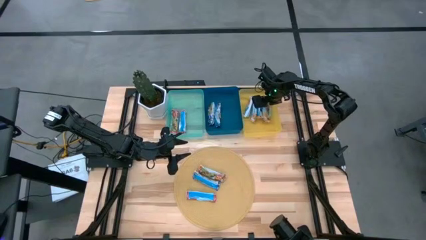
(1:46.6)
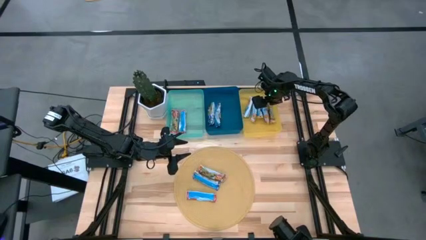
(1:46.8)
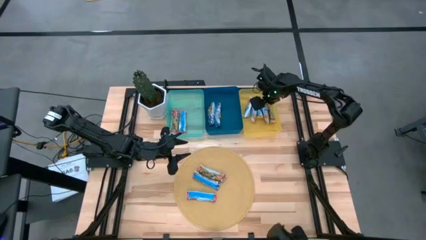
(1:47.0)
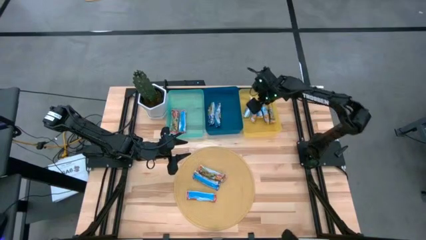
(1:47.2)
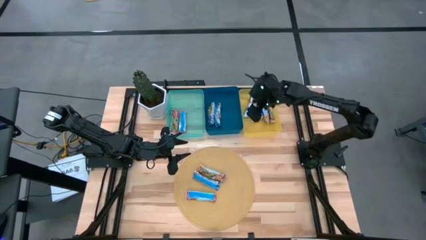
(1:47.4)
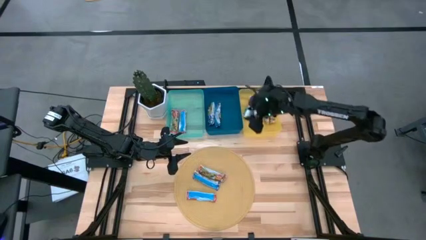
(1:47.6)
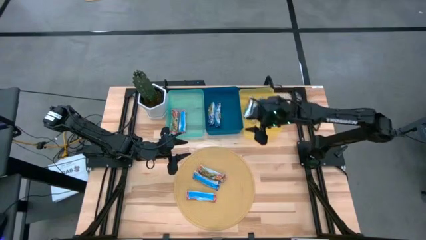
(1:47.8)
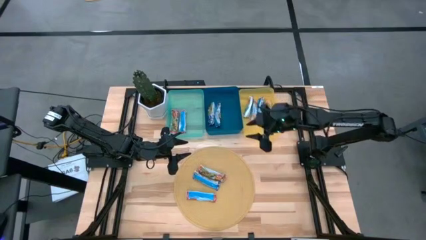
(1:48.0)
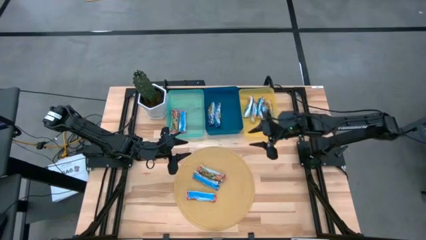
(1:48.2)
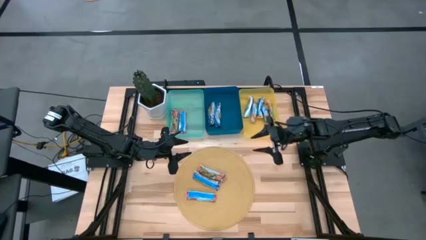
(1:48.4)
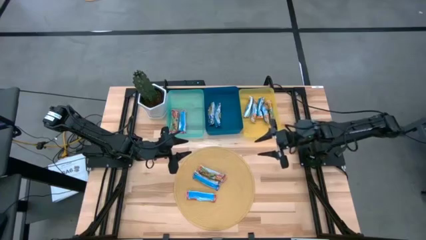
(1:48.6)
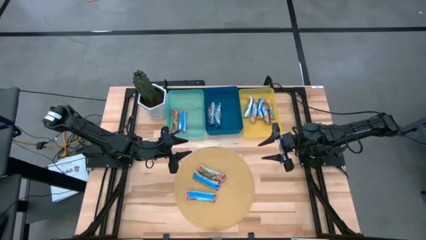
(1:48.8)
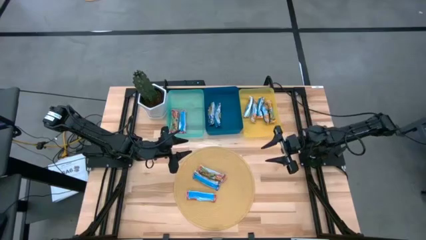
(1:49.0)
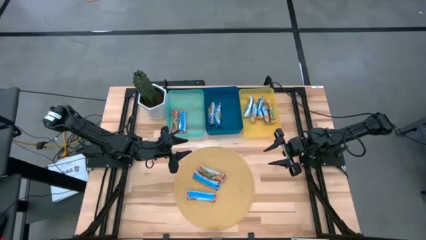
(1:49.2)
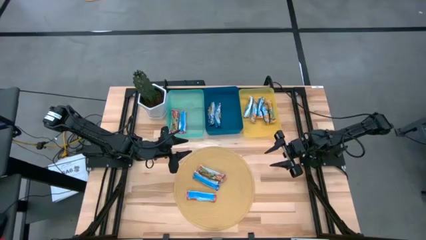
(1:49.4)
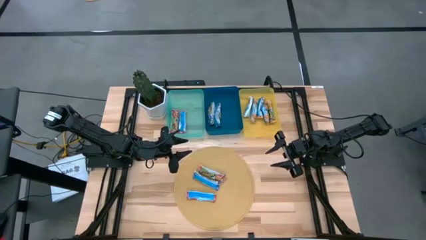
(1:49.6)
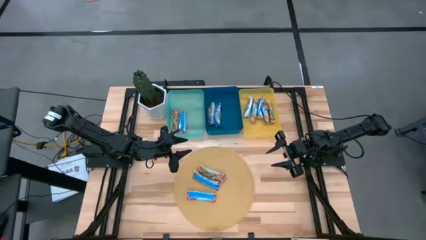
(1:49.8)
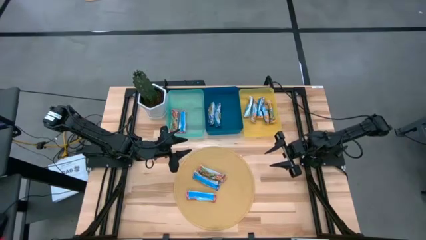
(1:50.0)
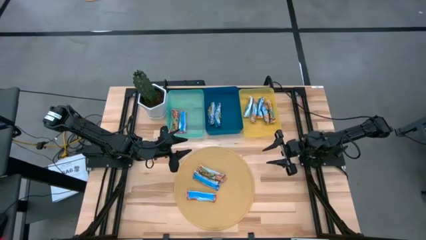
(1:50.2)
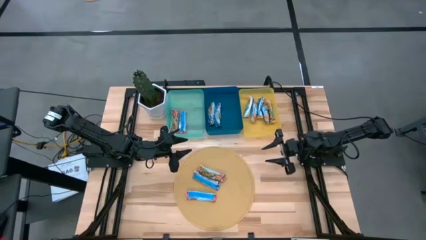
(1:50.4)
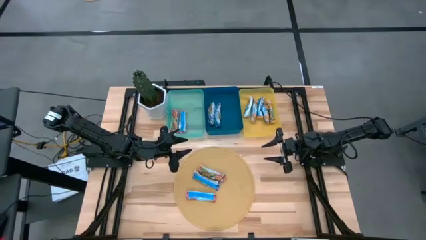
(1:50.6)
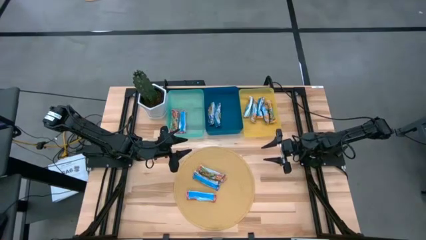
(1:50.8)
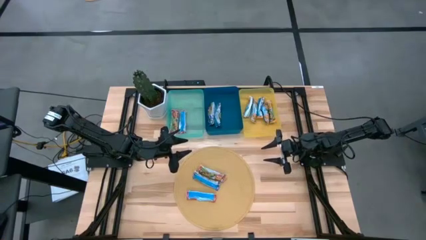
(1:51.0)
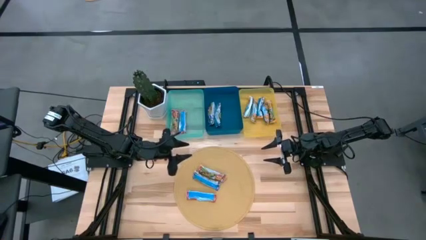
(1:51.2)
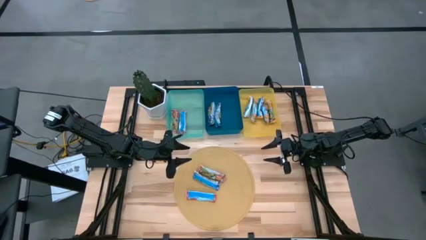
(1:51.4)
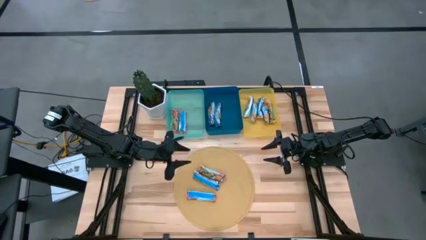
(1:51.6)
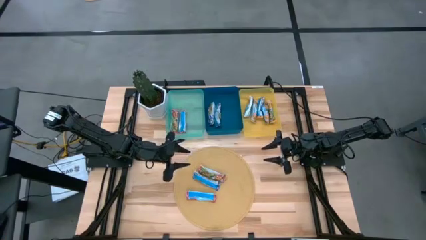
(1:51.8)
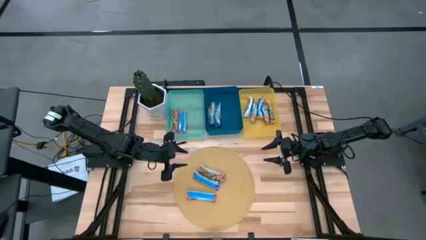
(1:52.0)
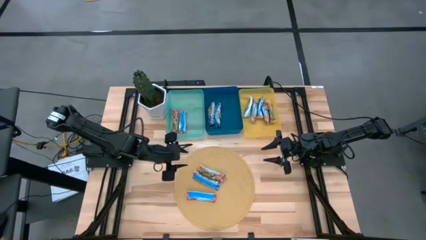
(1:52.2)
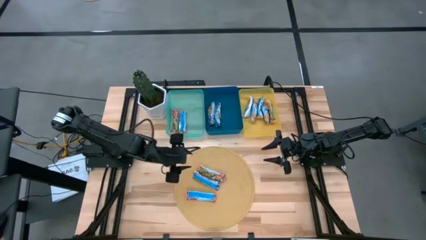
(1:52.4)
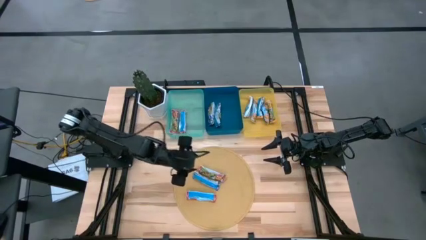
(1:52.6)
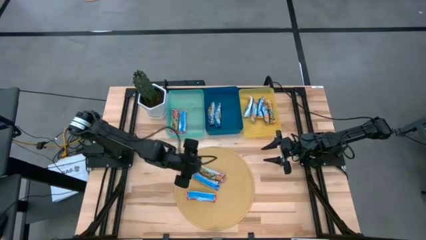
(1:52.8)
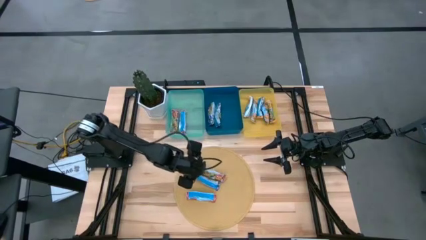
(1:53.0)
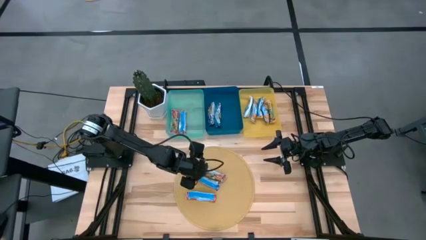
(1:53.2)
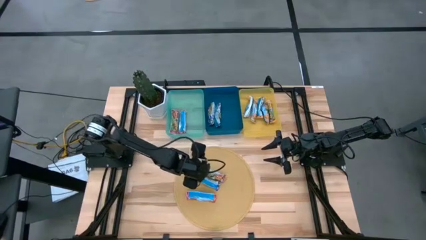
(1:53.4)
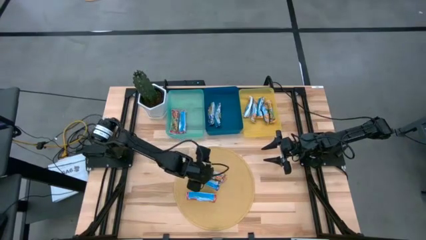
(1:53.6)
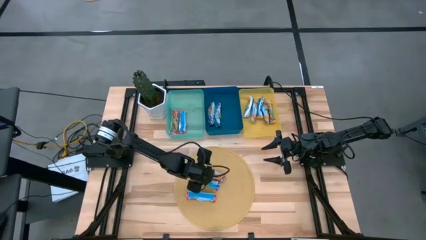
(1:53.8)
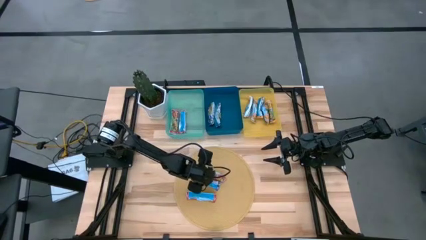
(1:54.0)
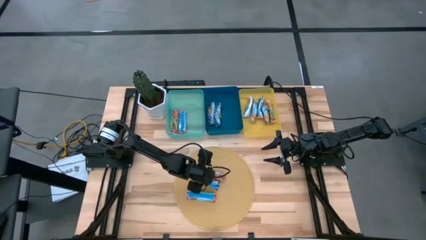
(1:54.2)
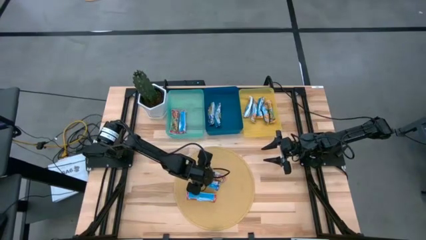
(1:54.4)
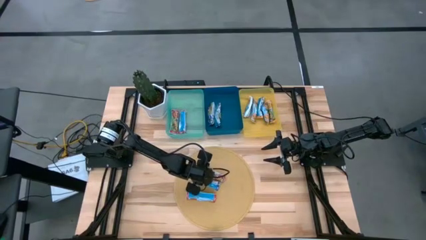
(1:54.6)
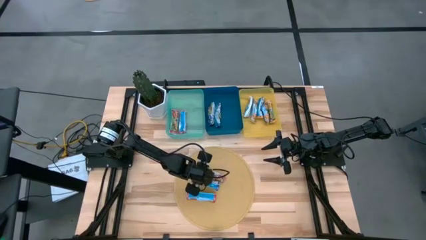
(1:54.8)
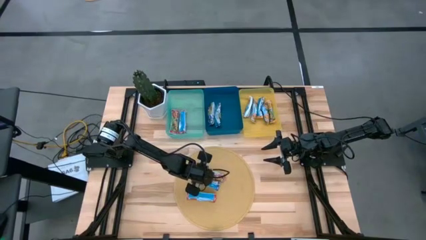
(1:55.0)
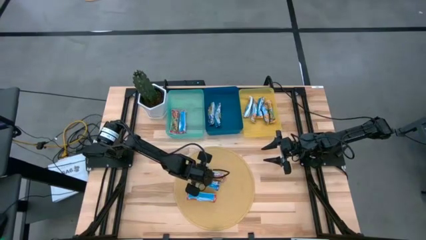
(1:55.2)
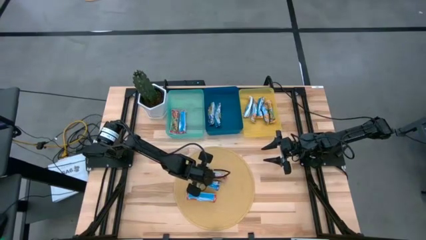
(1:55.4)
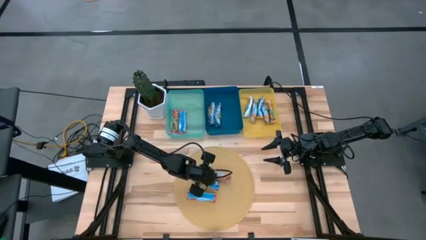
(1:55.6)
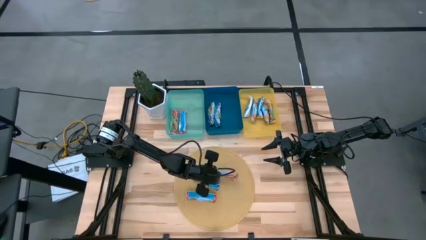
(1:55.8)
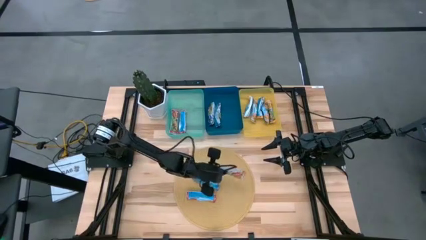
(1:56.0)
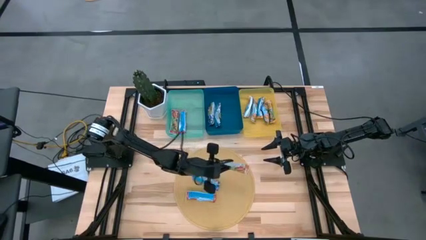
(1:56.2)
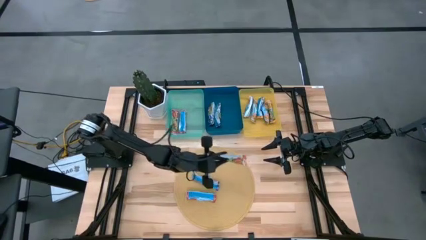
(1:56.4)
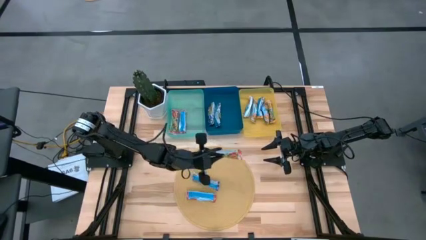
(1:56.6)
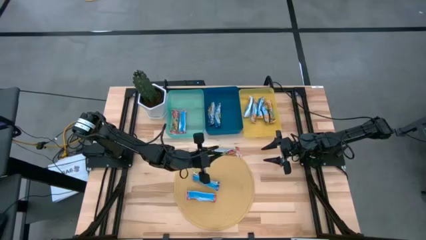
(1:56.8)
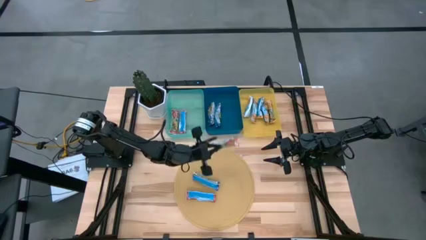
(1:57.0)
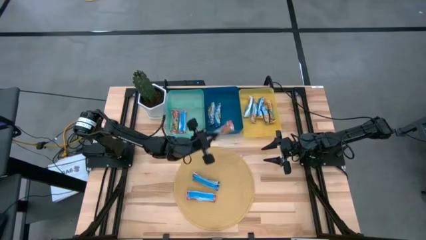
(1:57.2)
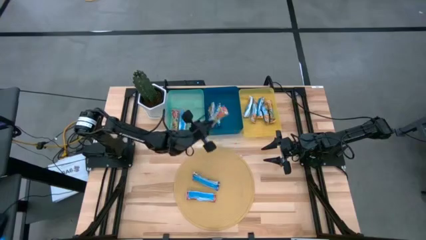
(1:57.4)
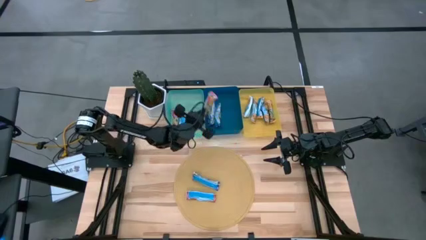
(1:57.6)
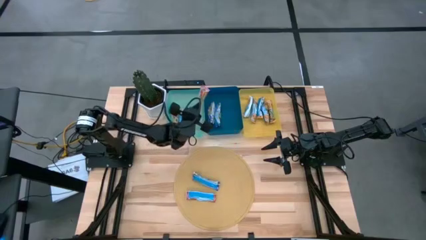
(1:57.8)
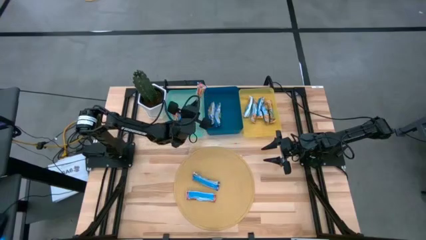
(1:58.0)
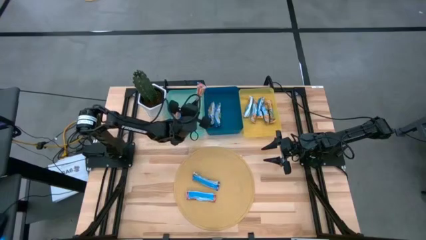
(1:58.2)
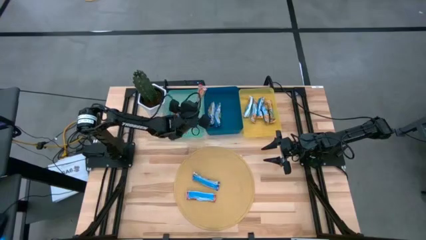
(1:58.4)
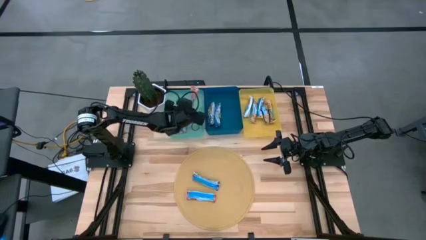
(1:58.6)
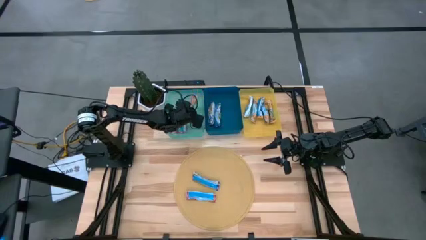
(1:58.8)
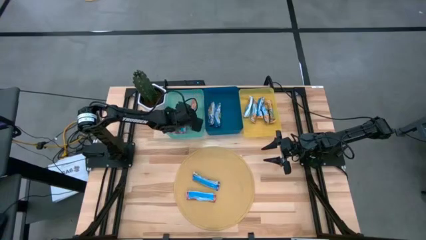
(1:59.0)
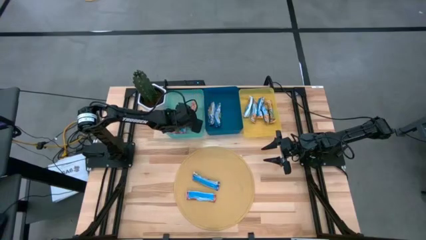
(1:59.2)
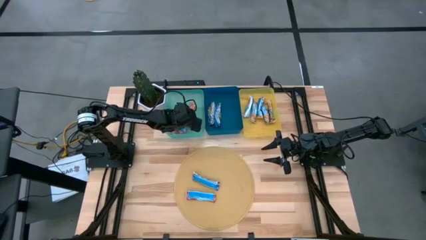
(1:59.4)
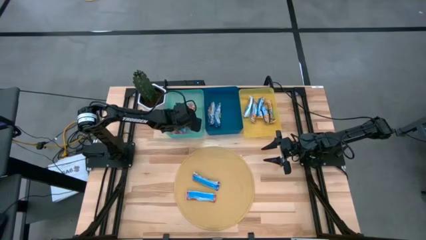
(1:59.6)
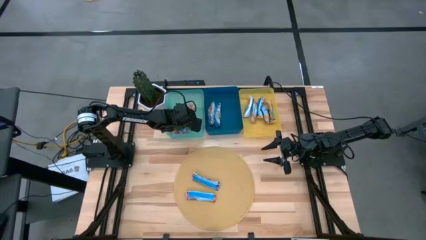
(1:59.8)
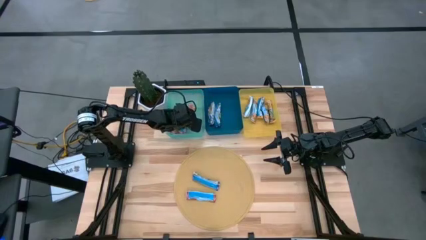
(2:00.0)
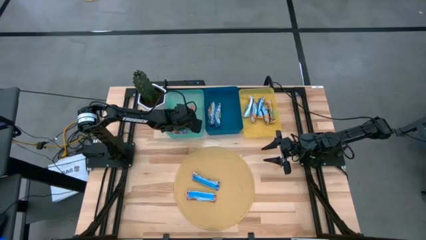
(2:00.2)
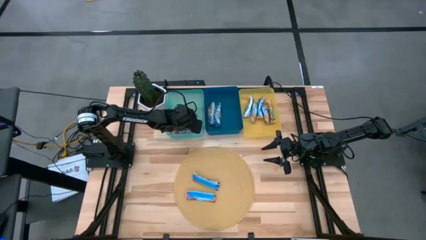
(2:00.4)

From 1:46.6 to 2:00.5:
Task: Pick and place Granola Bars by type
Put the red granola bar into the green bin

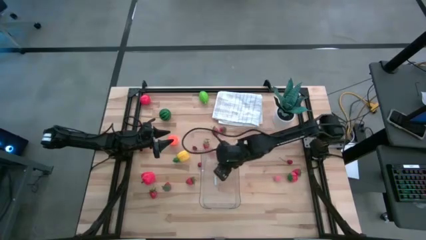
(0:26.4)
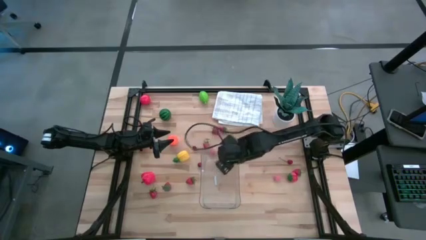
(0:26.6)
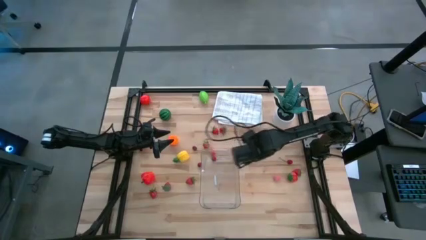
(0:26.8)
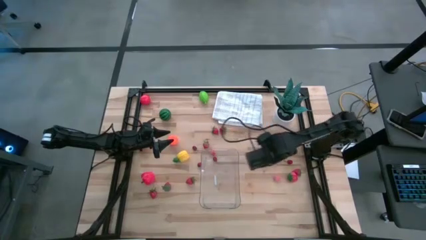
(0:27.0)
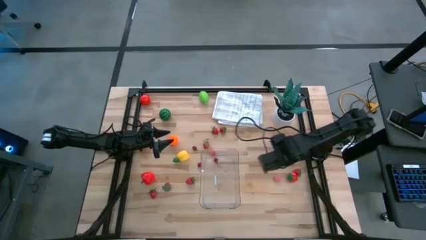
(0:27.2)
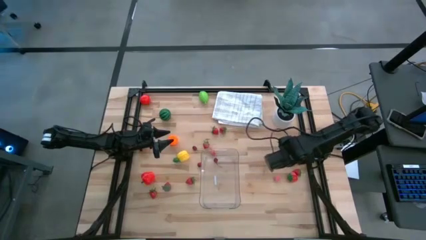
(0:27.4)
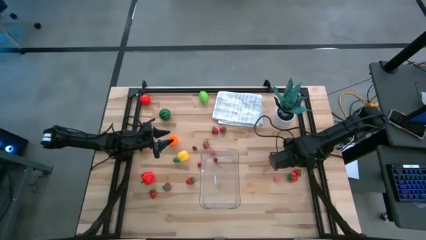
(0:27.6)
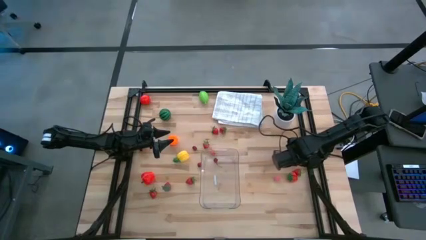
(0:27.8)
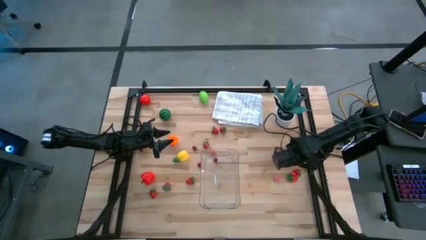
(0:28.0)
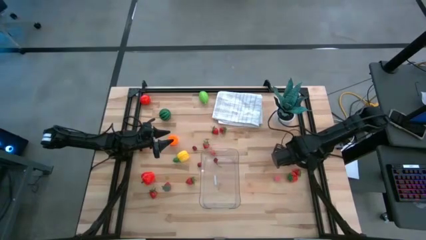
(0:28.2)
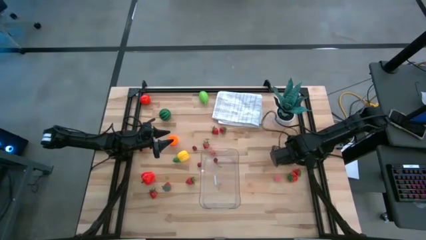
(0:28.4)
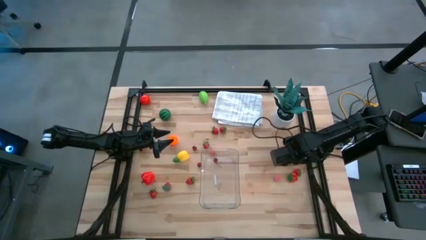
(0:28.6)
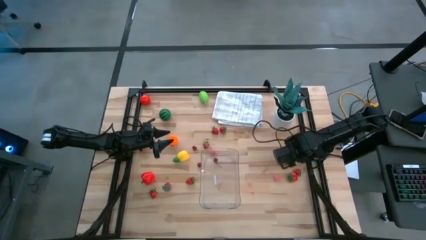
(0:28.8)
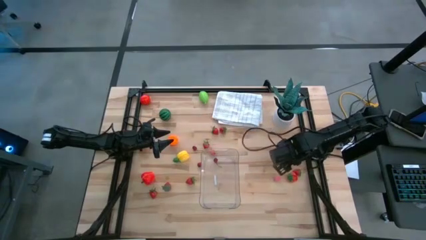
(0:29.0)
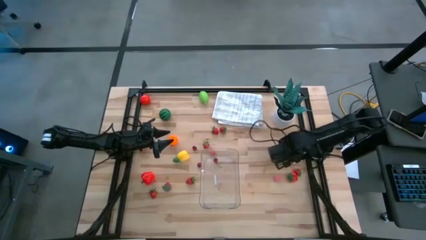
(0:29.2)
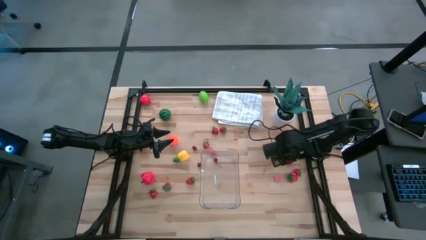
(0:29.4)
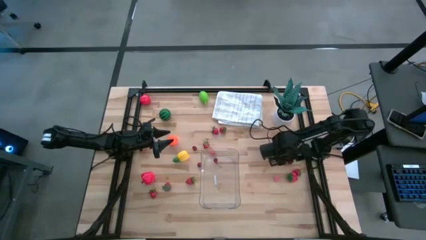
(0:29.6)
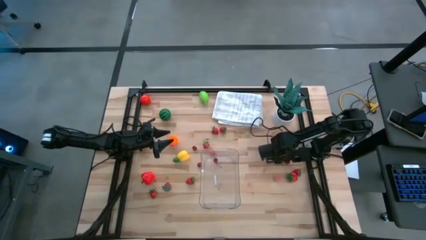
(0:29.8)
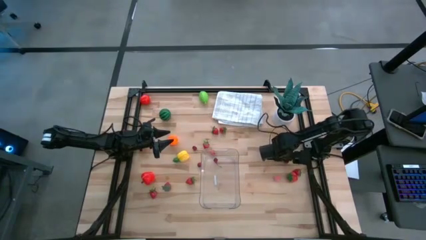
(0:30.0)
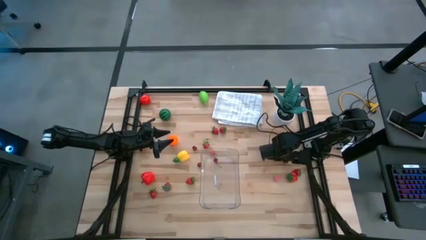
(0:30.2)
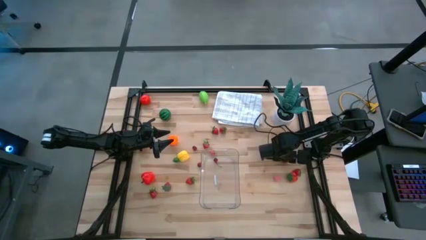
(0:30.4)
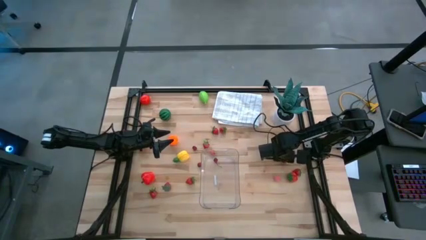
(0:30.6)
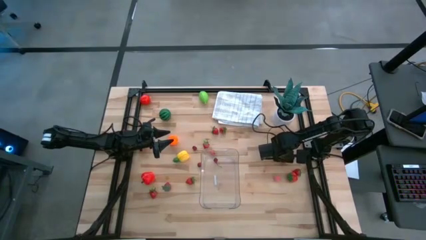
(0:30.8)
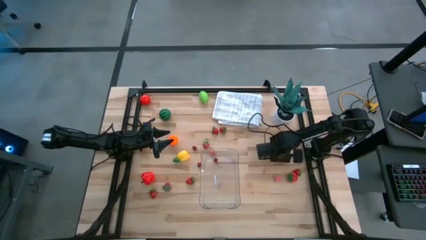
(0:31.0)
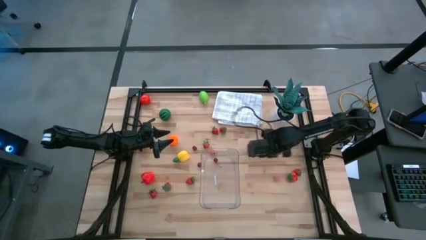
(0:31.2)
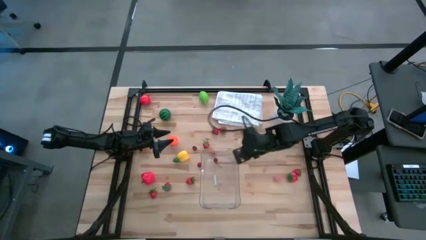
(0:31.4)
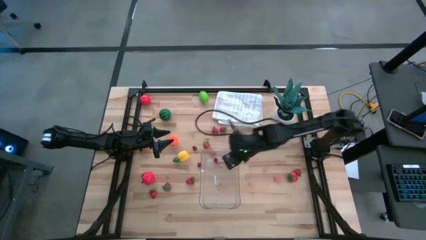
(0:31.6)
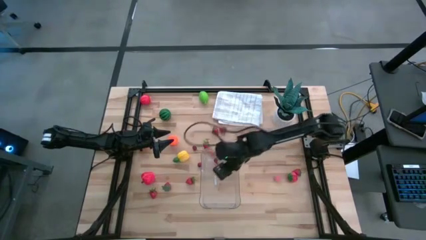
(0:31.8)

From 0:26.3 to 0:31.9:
Task: Pick and placing Produce into tupperware
Put the red cherry into the transparent bin
